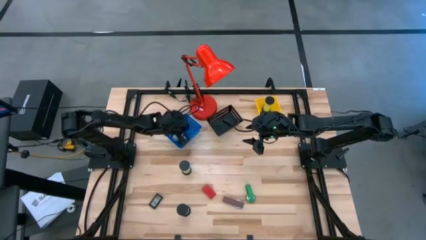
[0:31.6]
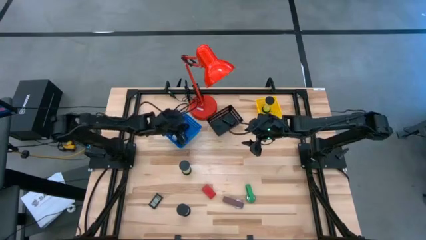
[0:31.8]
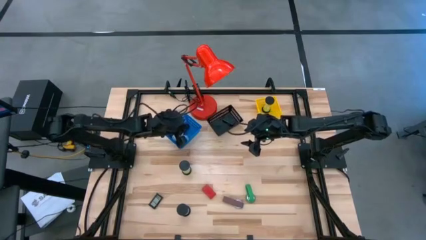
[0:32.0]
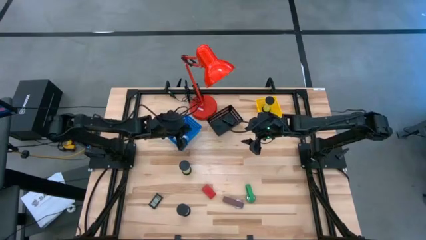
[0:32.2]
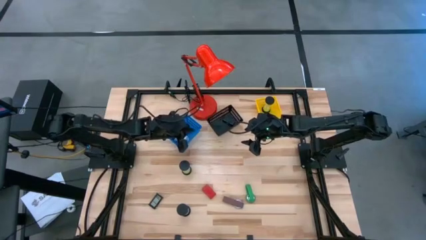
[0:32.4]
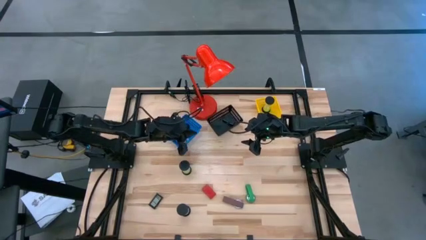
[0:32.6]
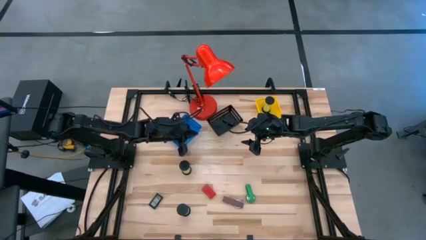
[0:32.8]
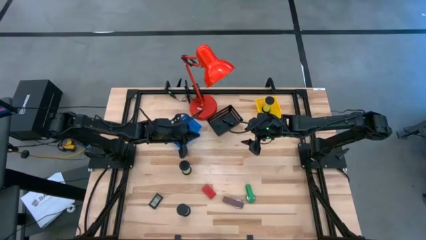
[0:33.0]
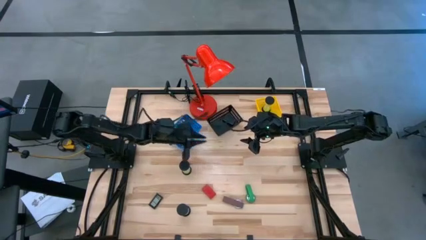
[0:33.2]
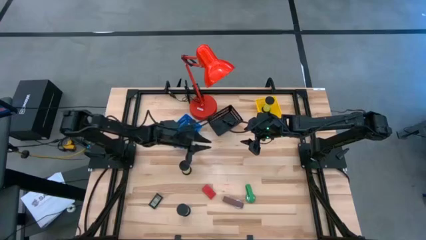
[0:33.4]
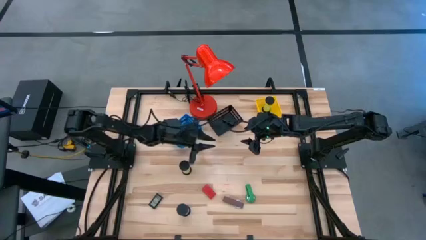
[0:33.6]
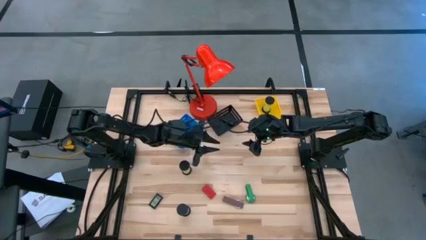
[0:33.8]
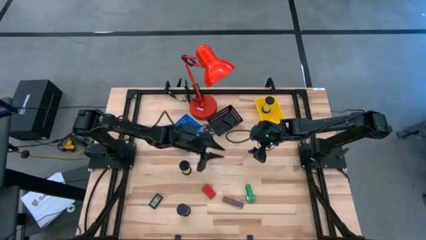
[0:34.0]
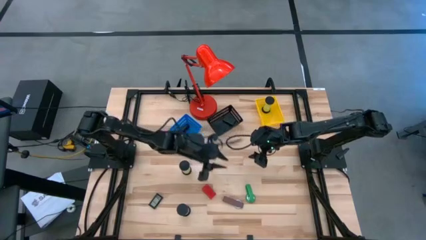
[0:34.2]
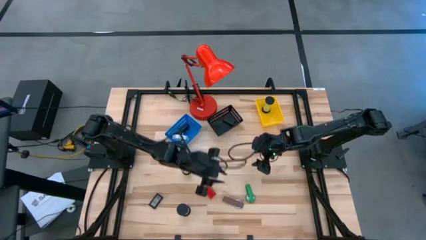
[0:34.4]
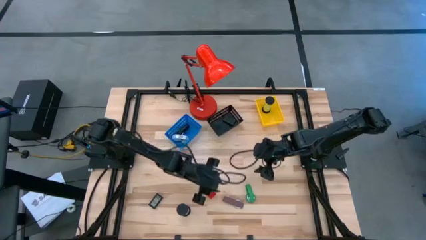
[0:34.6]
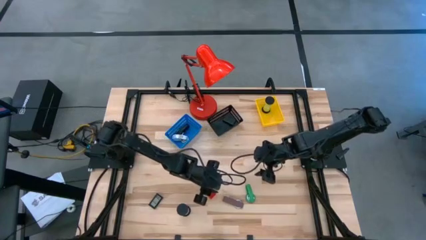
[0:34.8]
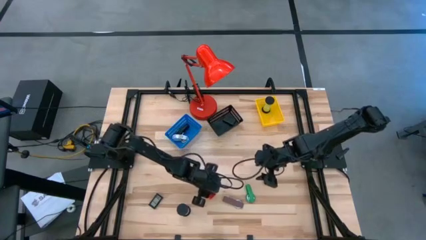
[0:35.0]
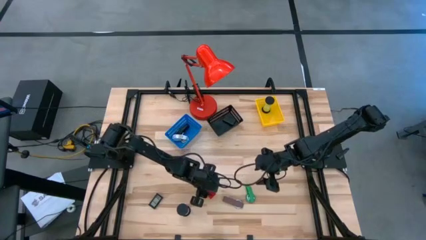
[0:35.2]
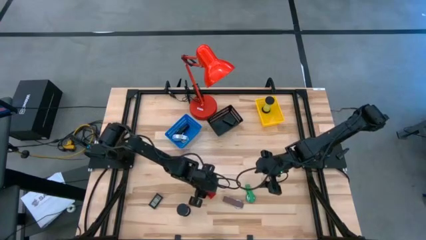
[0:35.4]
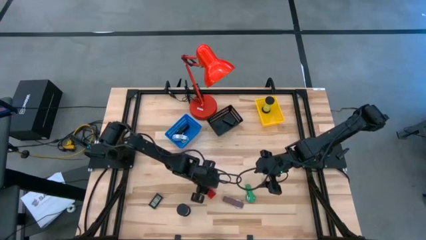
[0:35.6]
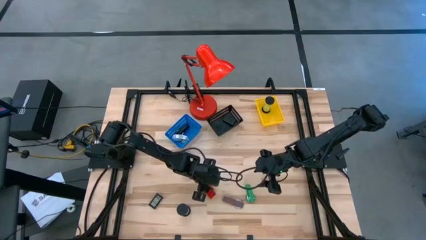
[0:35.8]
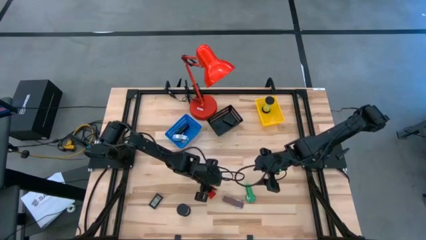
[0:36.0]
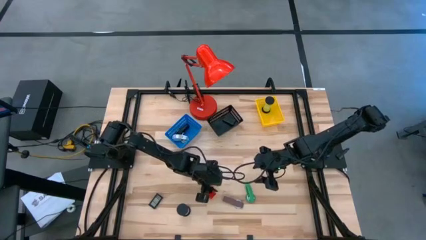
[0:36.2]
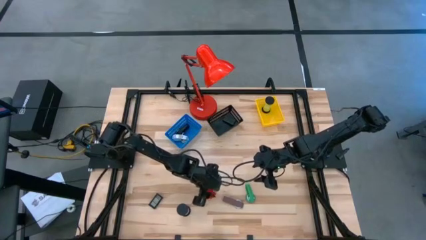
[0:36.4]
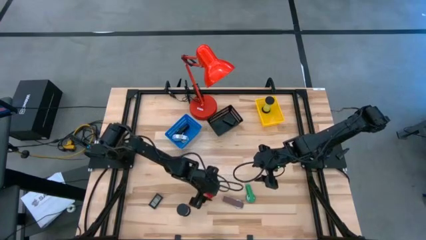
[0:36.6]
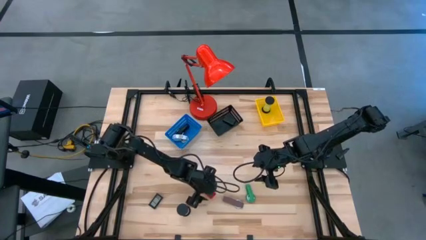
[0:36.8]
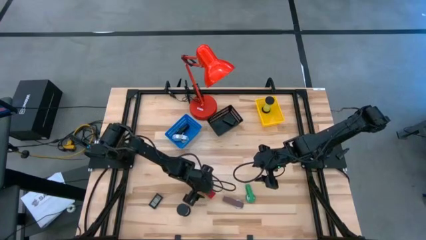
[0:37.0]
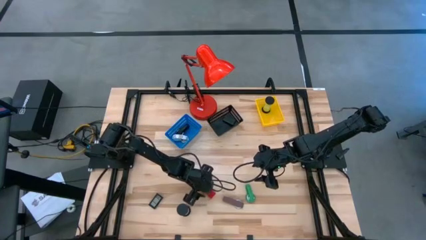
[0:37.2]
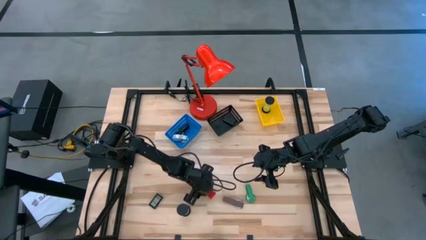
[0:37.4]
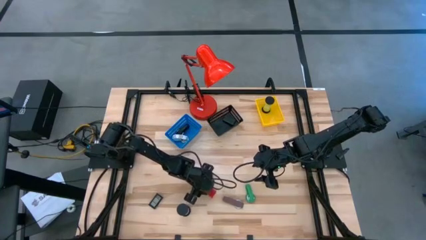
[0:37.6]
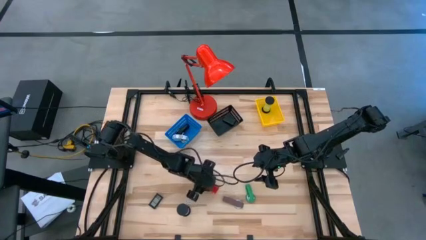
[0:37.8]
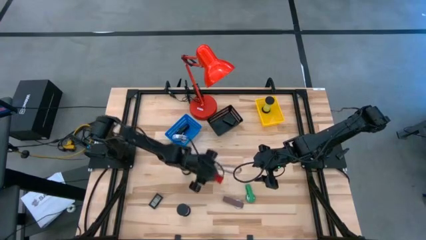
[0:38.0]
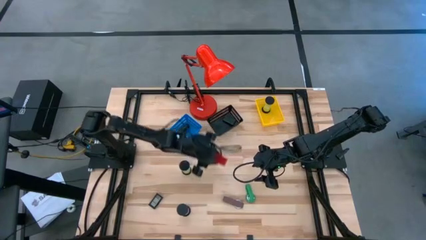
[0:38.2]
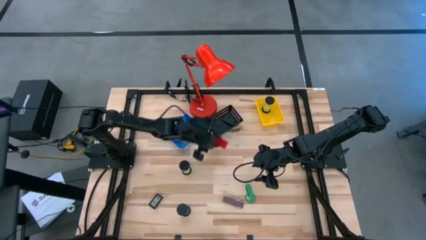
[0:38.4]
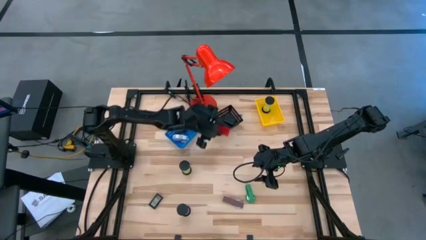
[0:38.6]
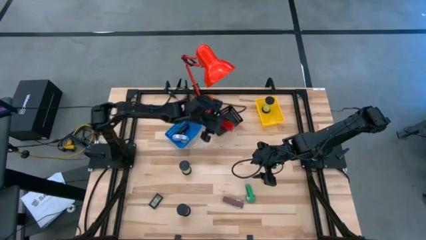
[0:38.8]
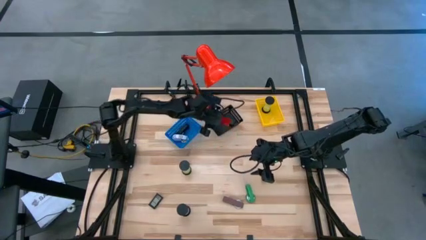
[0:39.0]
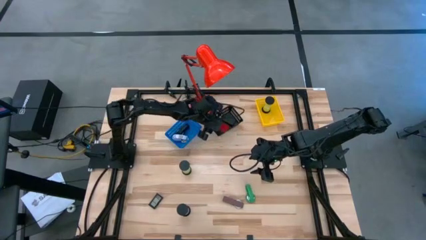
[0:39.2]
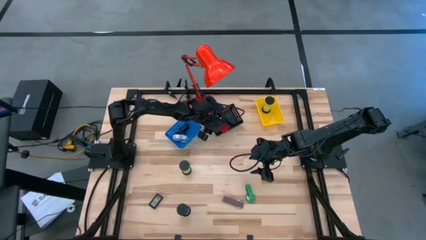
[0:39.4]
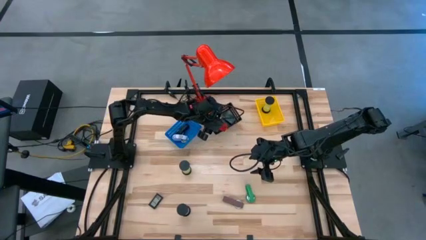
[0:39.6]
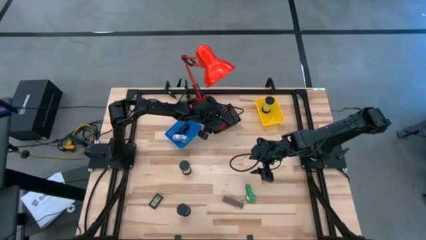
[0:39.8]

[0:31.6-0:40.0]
Task: Pick & Place Office items
Put the red digital clock into the black bin

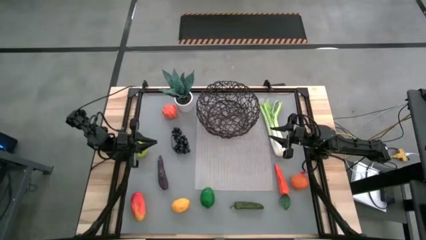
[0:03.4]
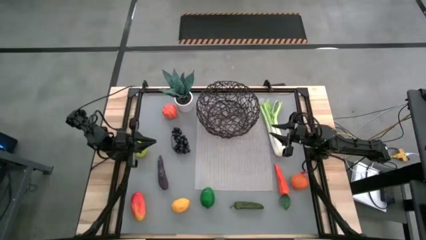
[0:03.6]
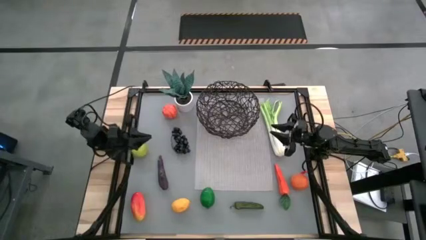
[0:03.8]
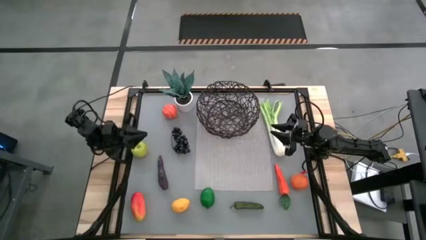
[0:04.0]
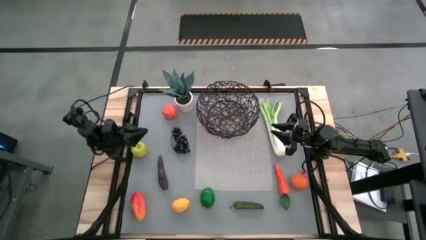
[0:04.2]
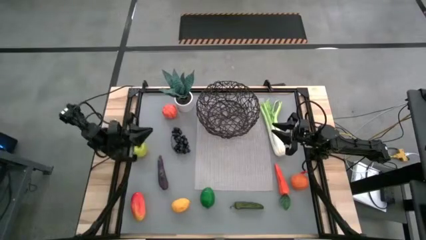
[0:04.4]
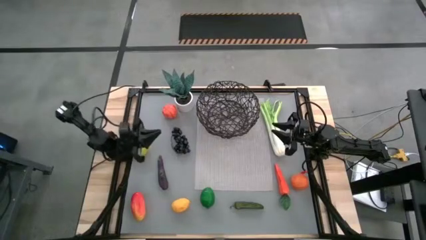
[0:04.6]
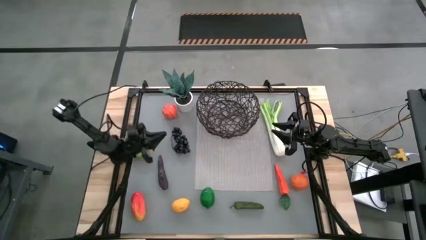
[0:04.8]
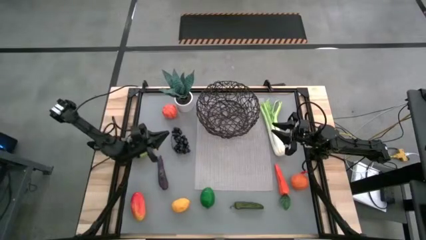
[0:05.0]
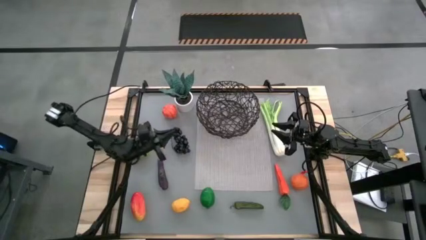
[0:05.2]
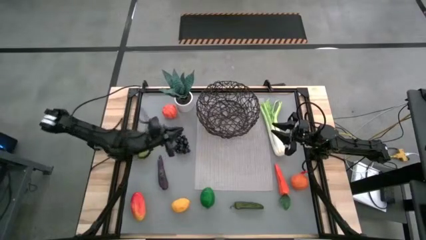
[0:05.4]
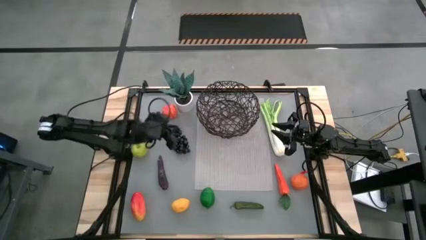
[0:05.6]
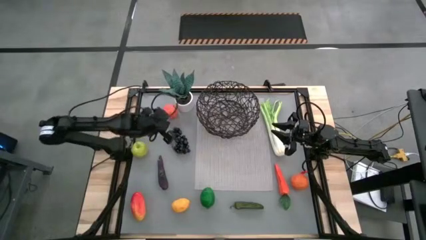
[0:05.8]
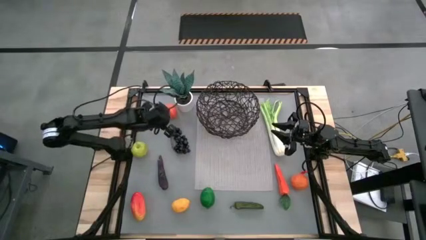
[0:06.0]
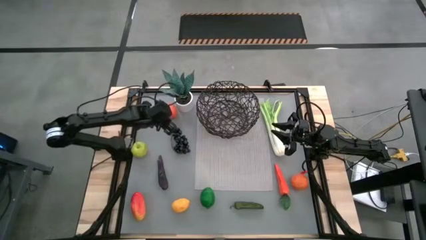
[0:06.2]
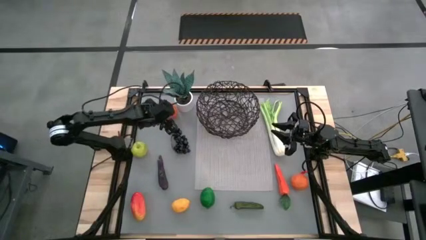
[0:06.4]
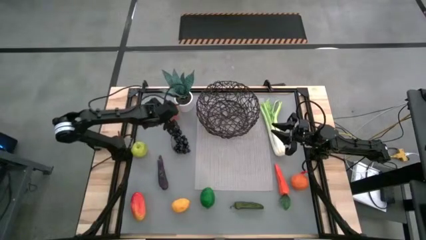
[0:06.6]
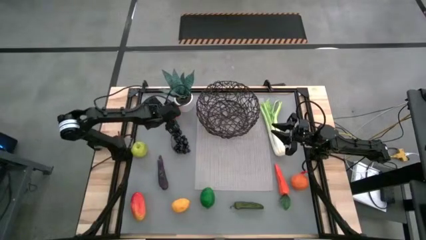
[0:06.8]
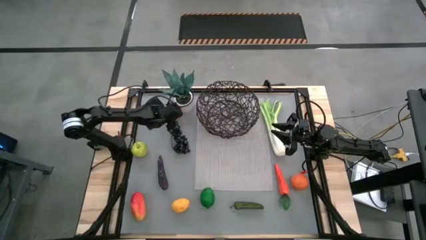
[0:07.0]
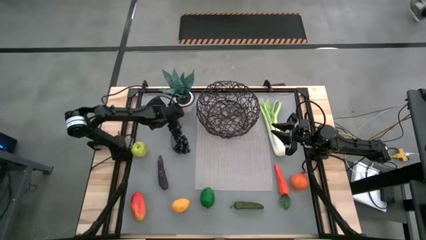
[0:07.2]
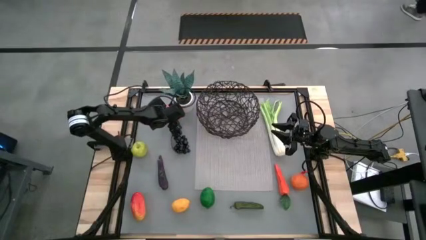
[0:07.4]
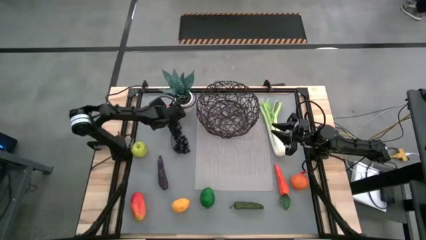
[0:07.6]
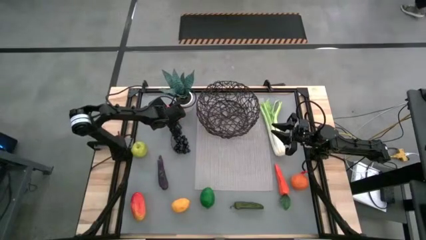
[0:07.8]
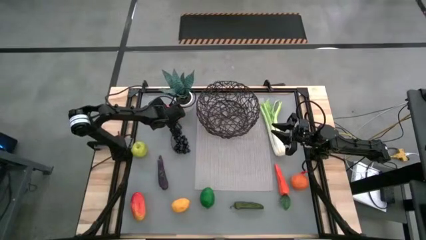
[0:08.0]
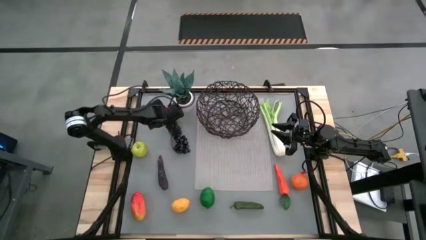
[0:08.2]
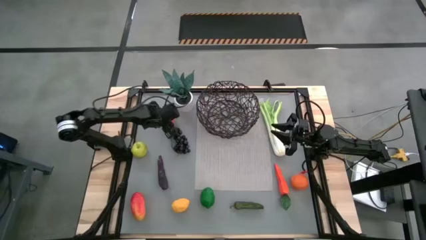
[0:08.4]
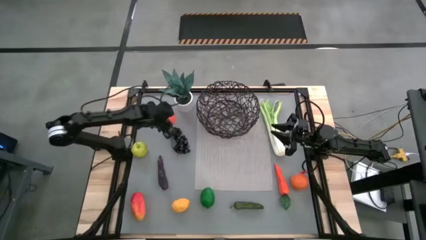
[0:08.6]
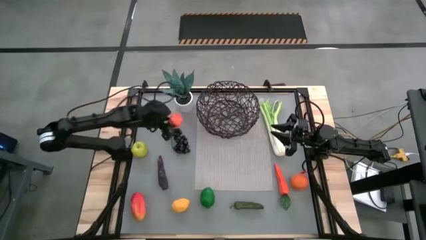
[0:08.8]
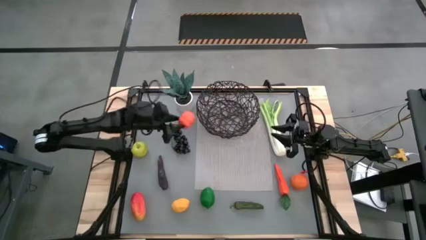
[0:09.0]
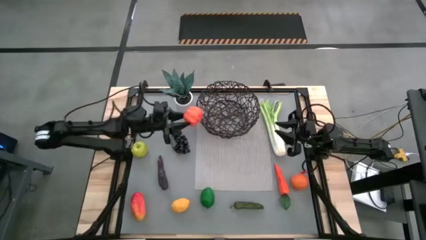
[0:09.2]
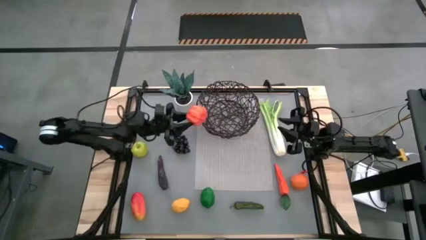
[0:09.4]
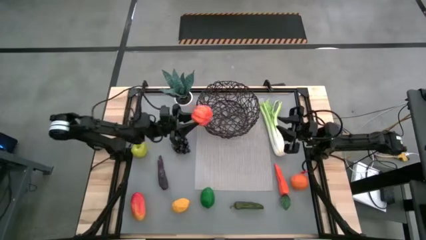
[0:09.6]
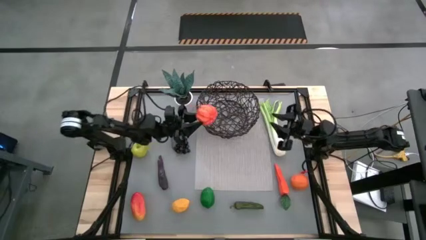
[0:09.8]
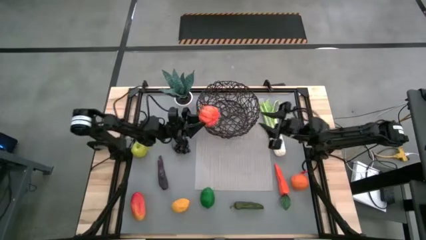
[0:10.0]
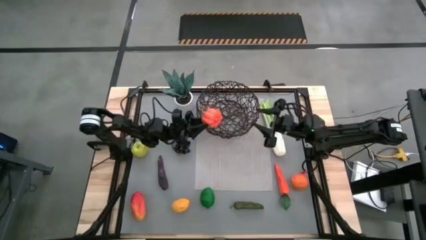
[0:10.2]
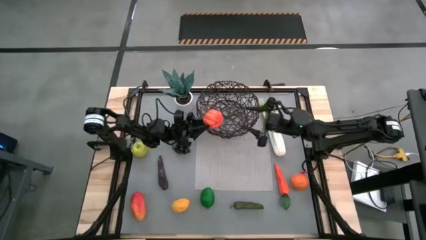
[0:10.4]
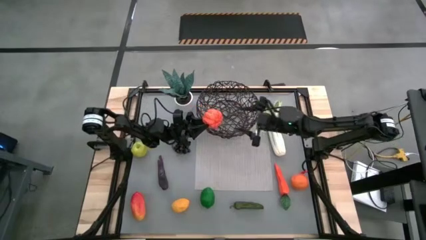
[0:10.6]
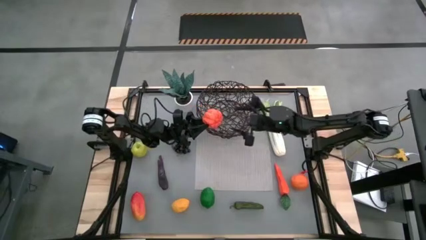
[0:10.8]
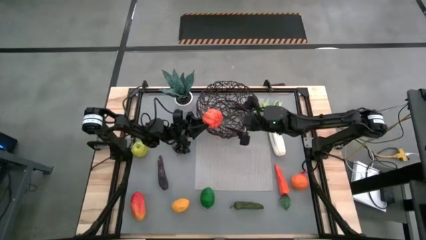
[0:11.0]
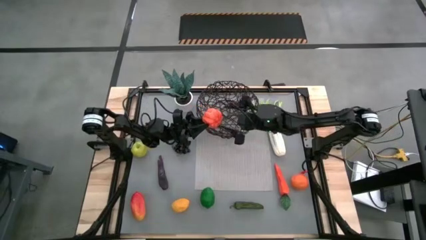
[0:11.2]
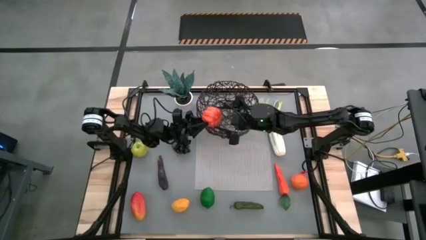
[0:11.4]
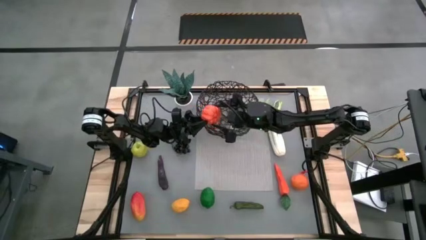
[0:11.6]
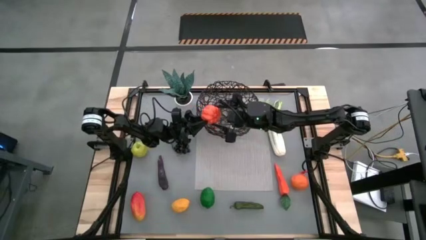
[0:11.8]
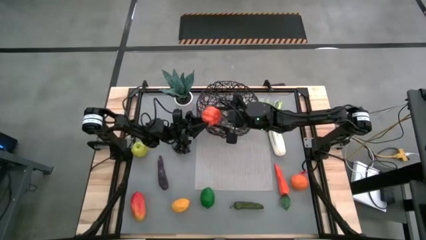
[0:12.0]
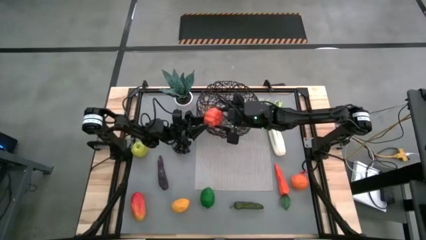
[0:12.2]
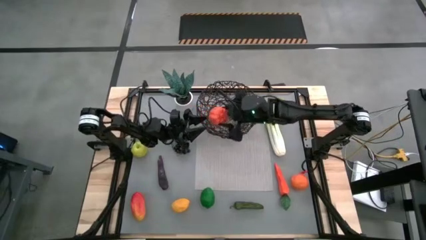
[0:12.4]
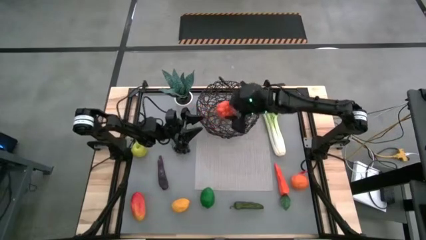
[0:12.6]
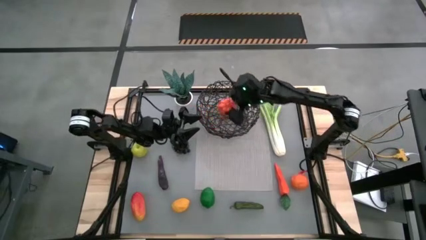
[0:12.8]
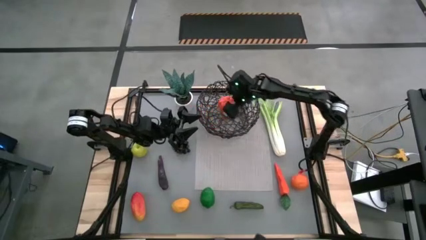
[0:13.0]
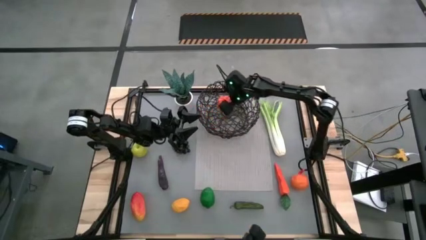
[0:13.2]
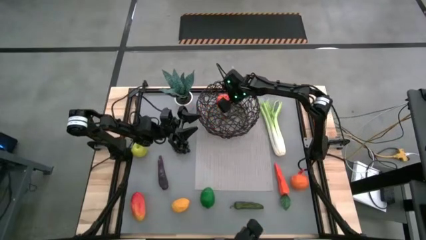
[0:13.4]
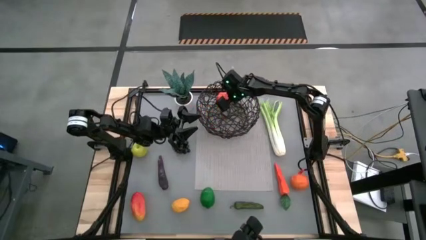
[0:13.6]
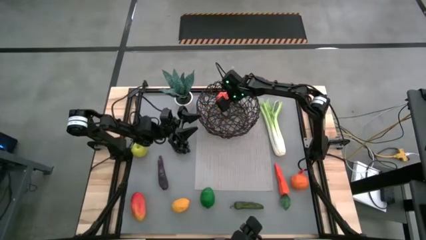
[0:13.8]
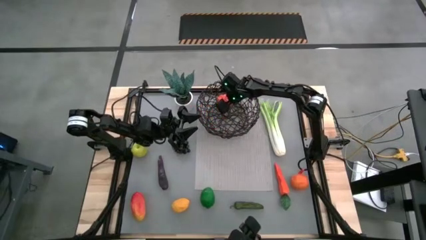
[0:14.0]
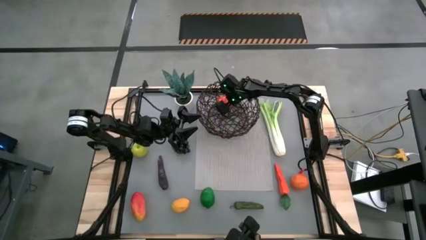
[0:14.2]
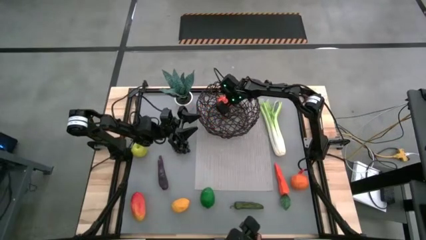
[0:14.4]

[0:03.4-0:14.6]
Task: Build produce basket
Put the orange pumpkin into the black wire basket
